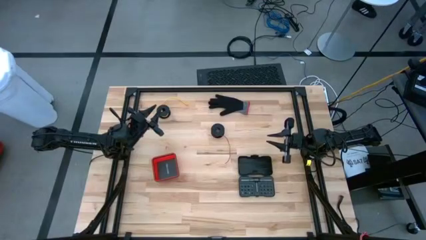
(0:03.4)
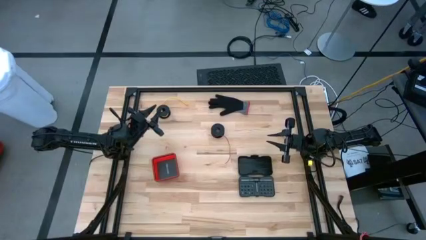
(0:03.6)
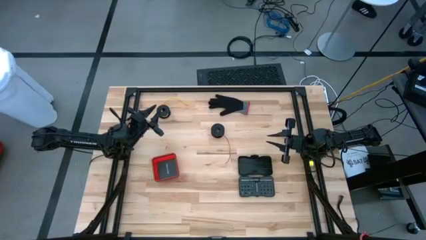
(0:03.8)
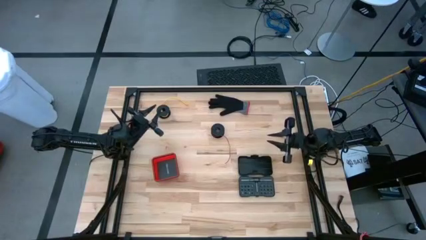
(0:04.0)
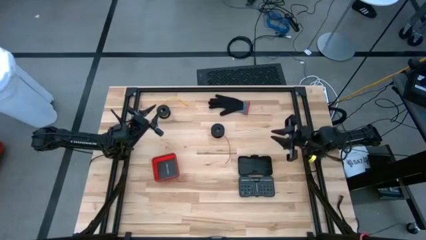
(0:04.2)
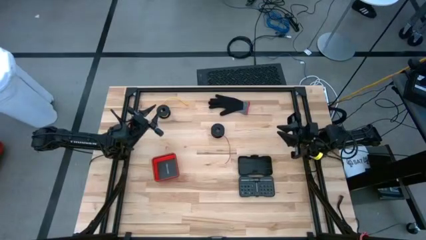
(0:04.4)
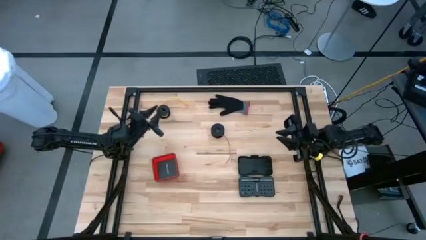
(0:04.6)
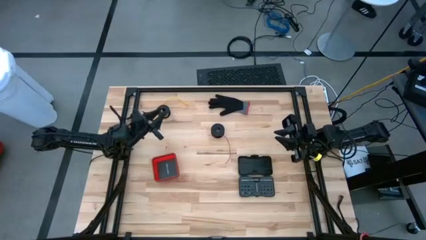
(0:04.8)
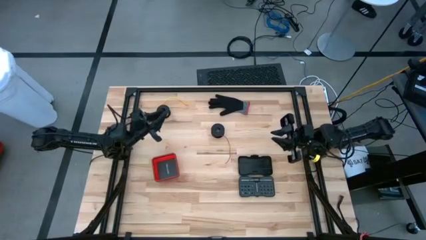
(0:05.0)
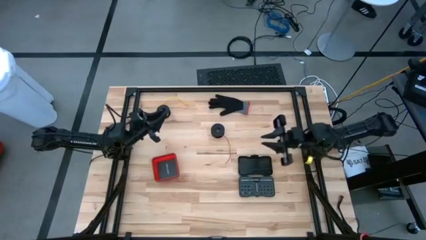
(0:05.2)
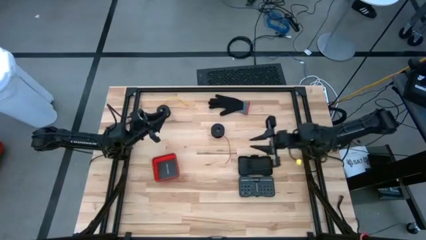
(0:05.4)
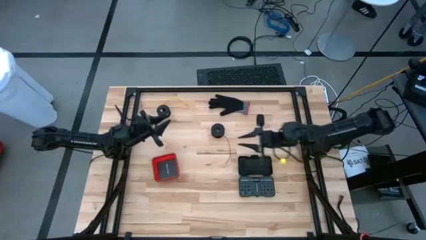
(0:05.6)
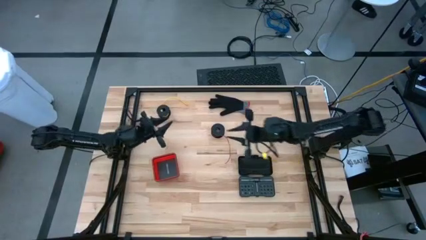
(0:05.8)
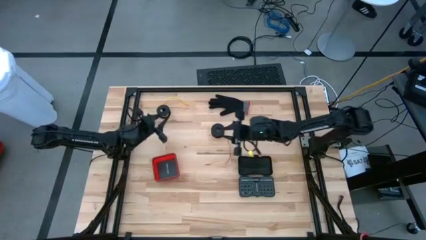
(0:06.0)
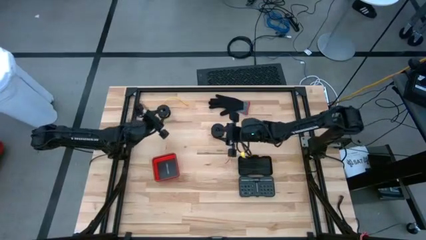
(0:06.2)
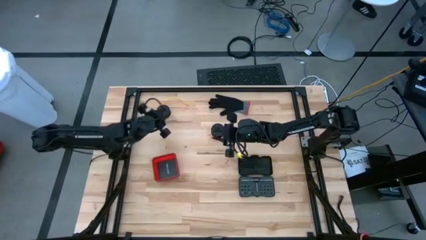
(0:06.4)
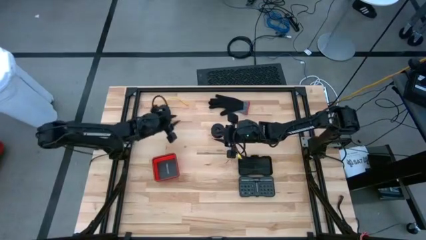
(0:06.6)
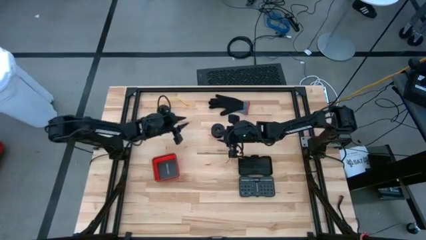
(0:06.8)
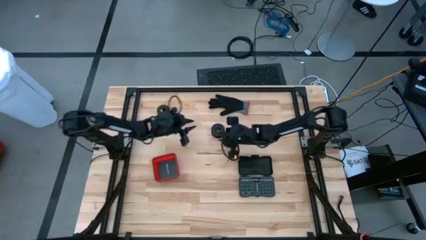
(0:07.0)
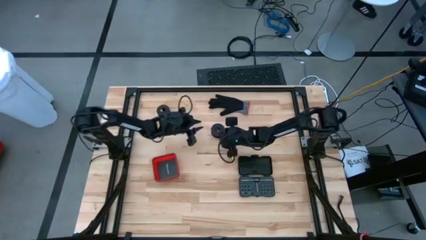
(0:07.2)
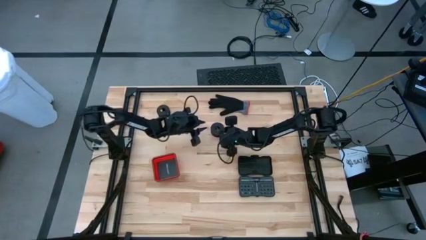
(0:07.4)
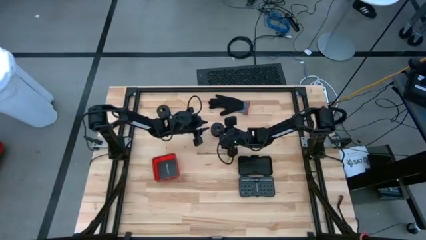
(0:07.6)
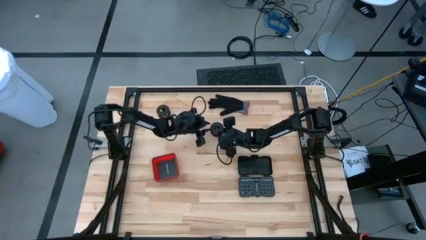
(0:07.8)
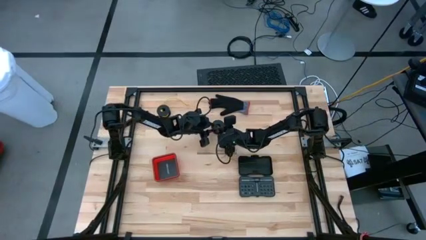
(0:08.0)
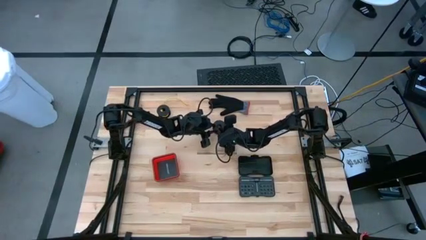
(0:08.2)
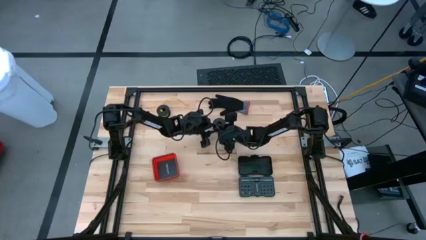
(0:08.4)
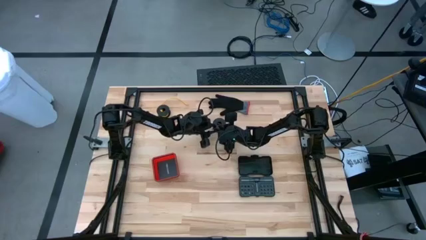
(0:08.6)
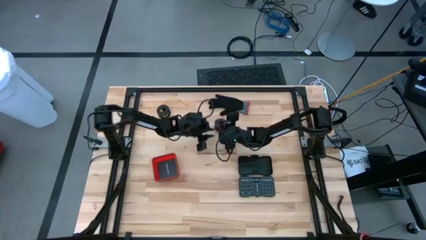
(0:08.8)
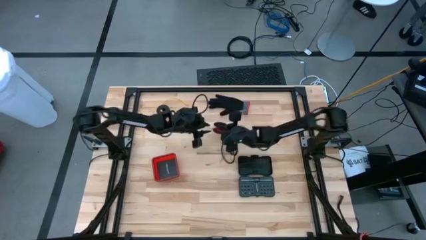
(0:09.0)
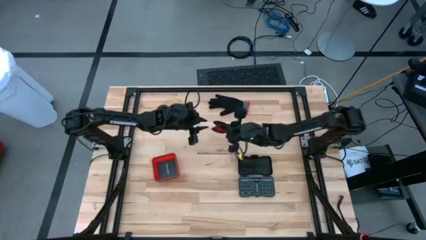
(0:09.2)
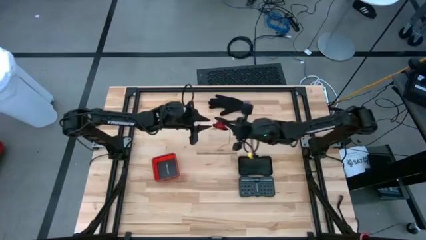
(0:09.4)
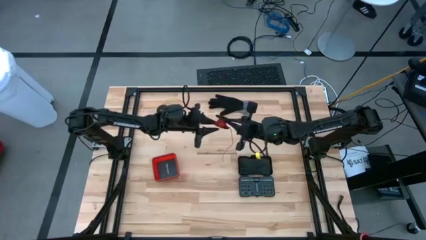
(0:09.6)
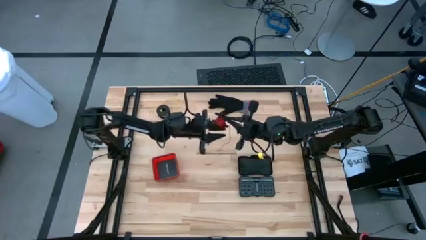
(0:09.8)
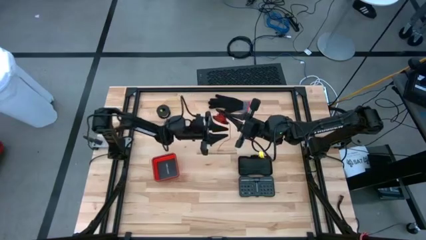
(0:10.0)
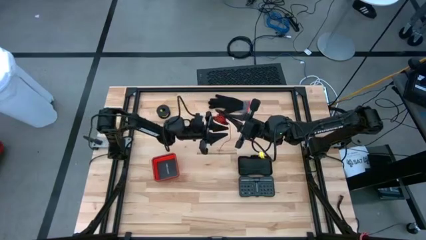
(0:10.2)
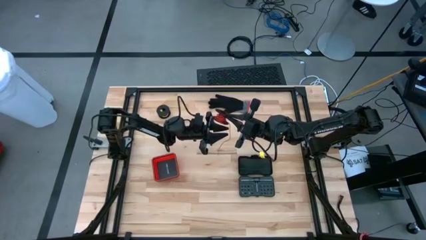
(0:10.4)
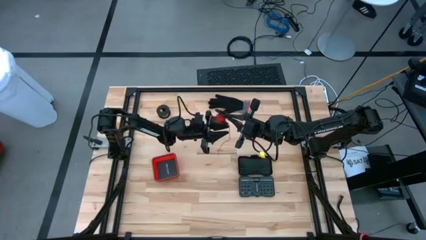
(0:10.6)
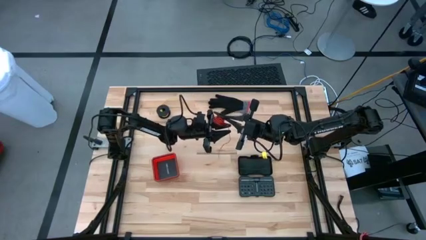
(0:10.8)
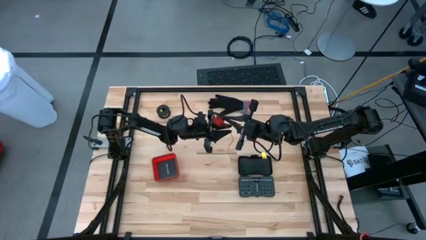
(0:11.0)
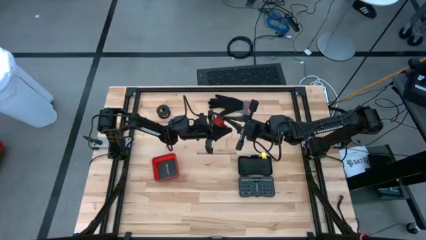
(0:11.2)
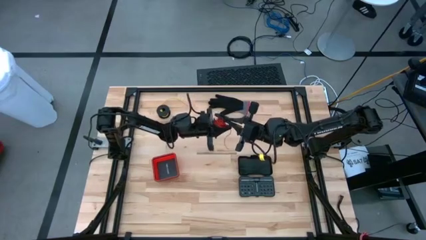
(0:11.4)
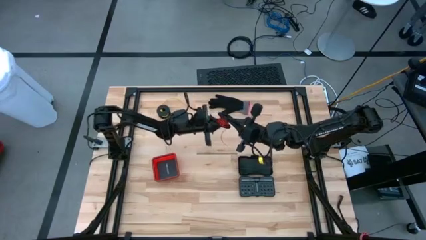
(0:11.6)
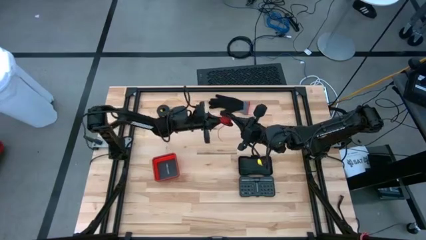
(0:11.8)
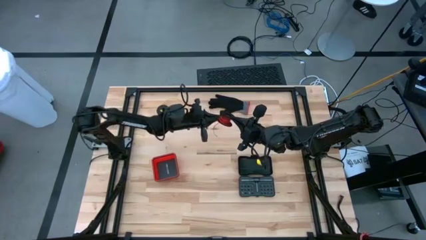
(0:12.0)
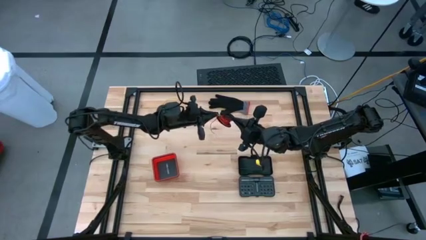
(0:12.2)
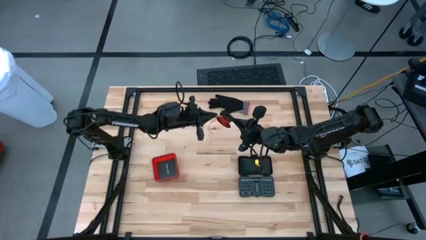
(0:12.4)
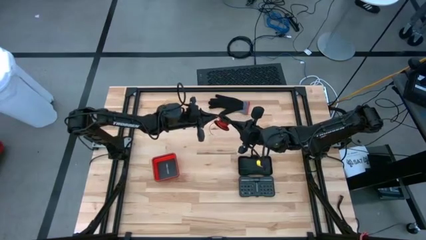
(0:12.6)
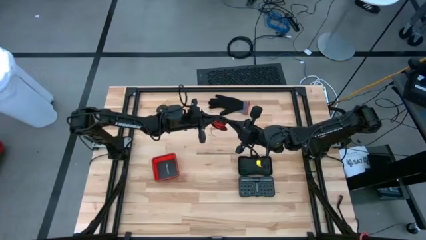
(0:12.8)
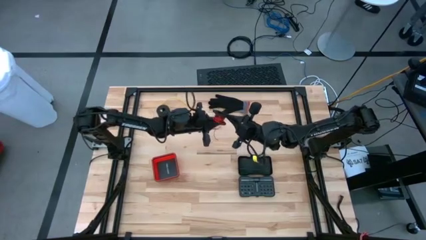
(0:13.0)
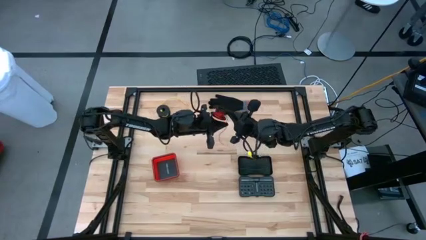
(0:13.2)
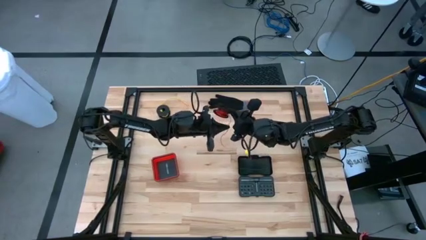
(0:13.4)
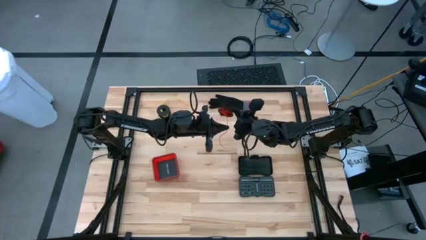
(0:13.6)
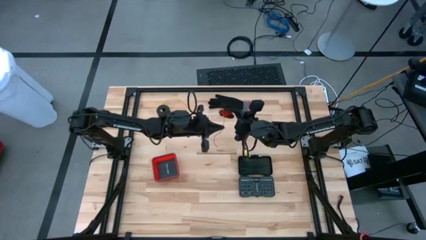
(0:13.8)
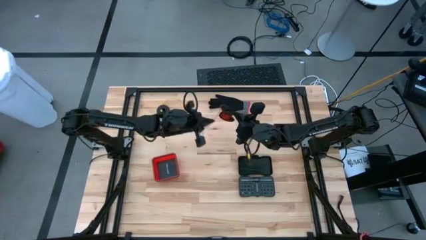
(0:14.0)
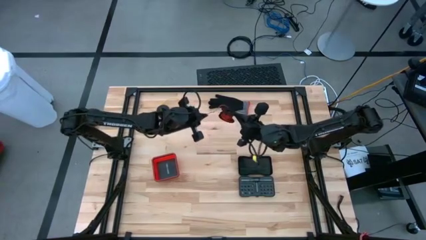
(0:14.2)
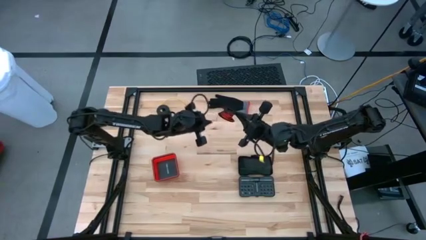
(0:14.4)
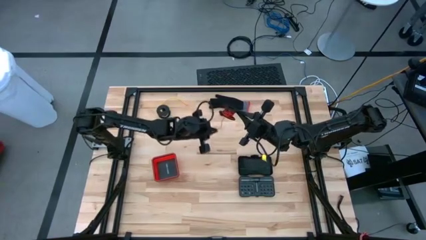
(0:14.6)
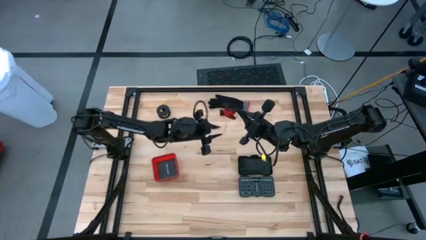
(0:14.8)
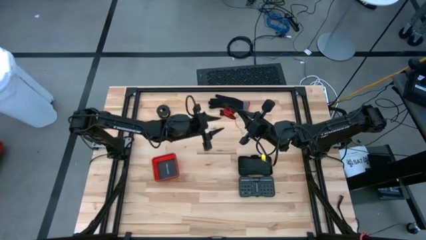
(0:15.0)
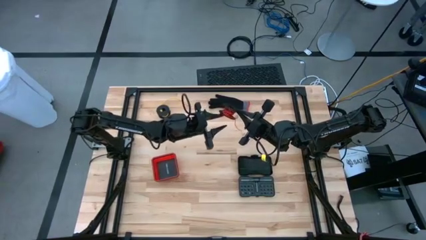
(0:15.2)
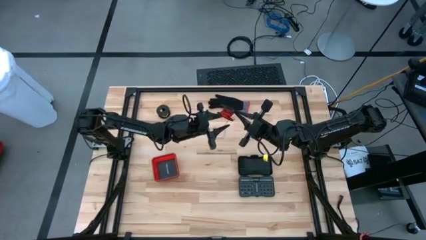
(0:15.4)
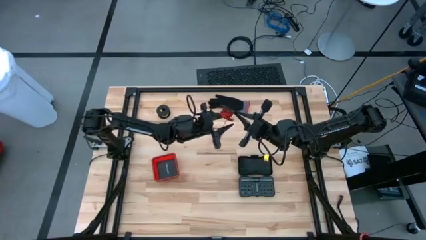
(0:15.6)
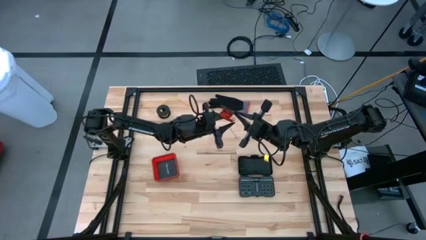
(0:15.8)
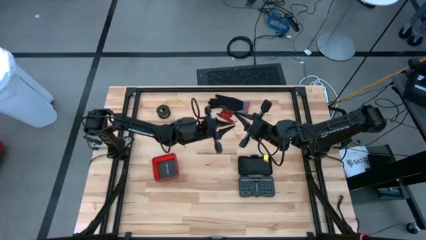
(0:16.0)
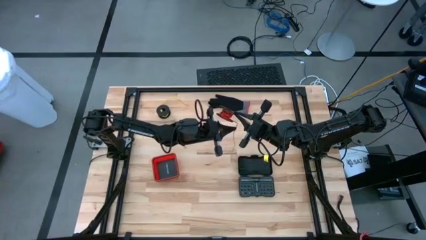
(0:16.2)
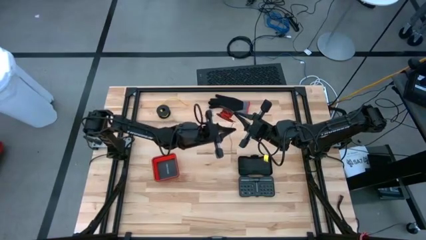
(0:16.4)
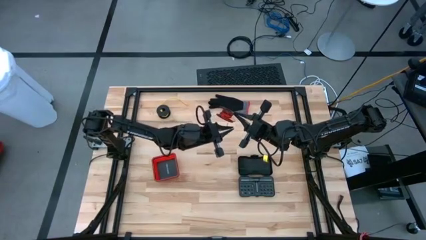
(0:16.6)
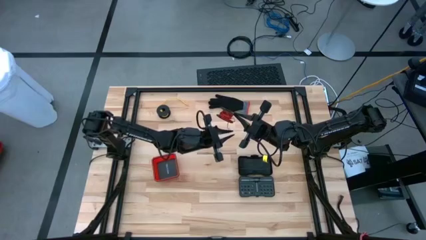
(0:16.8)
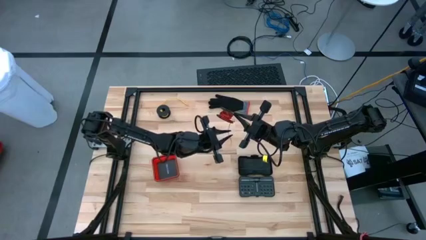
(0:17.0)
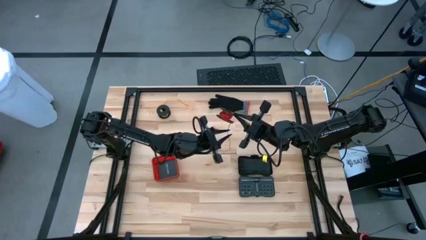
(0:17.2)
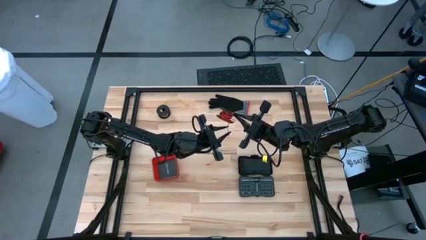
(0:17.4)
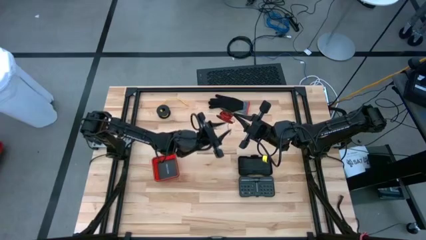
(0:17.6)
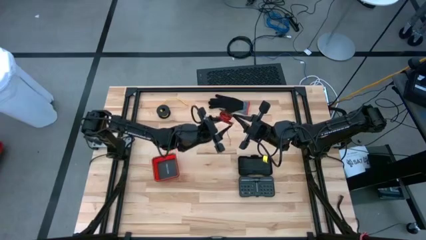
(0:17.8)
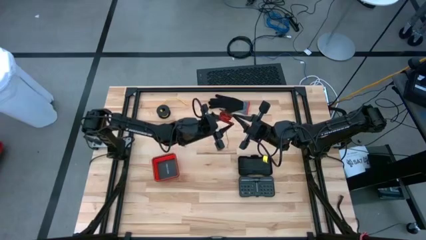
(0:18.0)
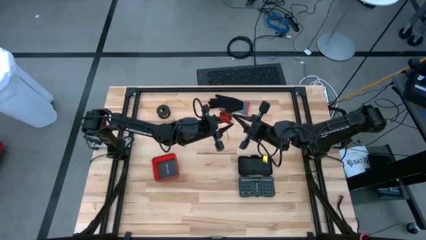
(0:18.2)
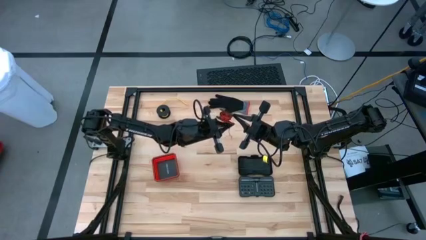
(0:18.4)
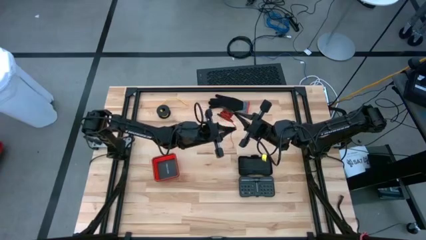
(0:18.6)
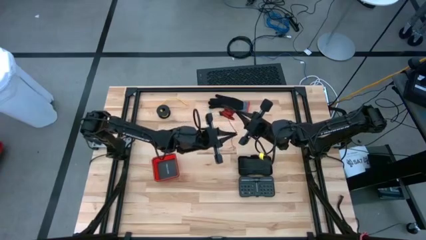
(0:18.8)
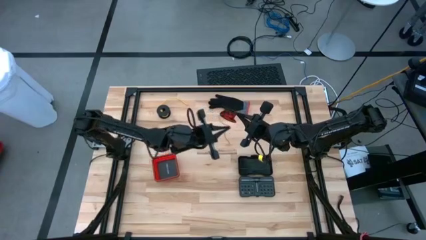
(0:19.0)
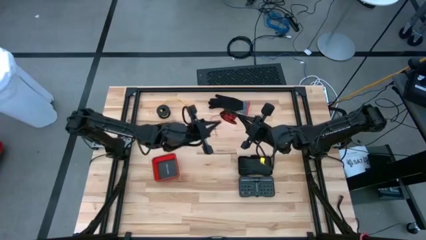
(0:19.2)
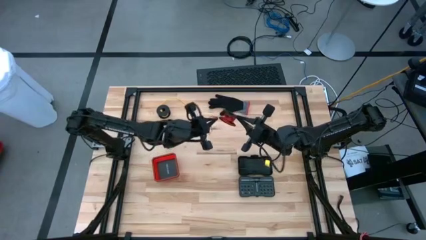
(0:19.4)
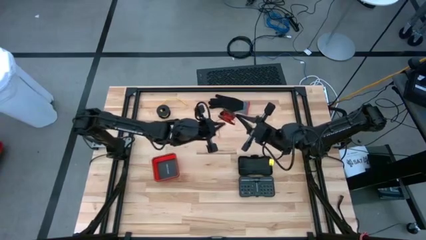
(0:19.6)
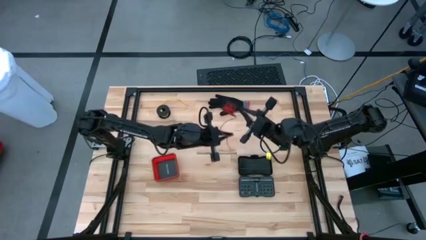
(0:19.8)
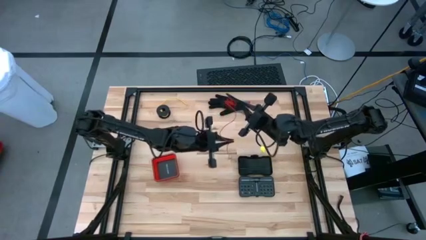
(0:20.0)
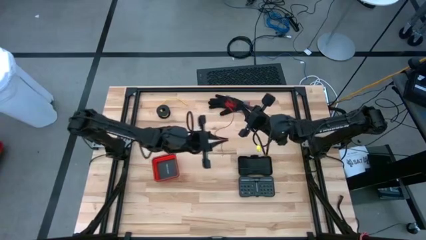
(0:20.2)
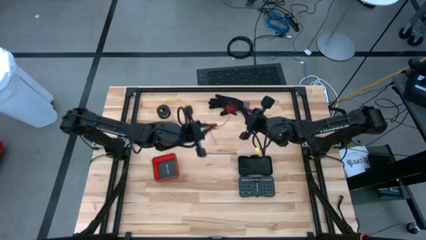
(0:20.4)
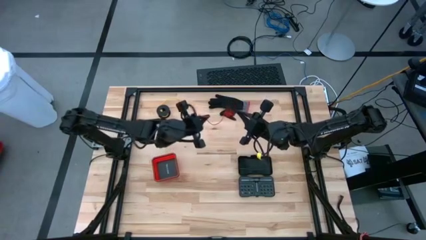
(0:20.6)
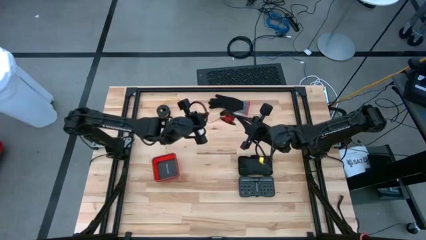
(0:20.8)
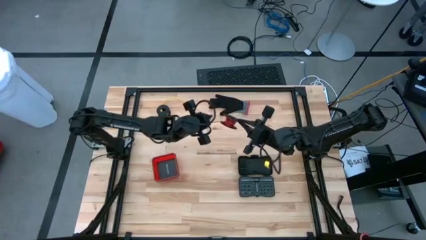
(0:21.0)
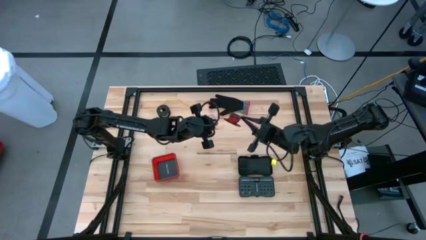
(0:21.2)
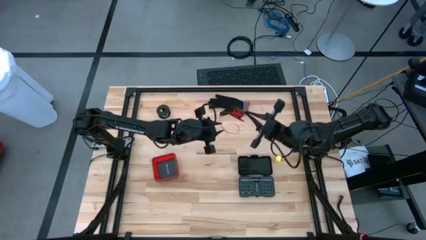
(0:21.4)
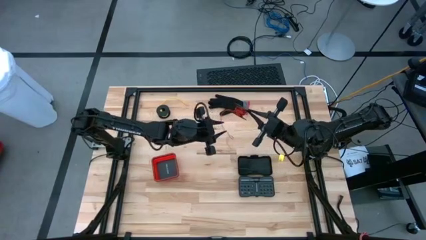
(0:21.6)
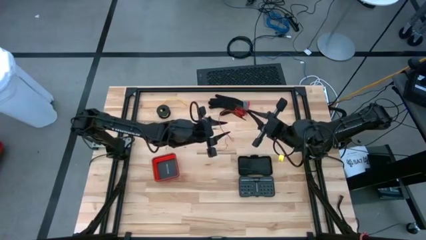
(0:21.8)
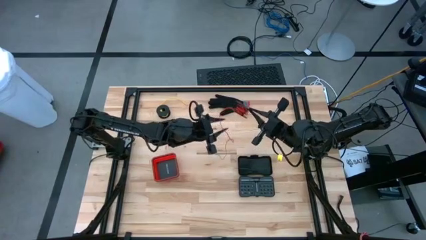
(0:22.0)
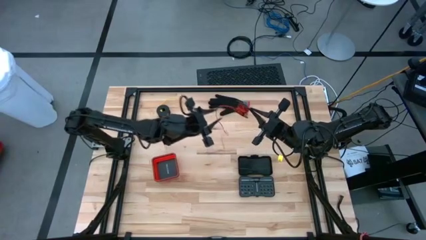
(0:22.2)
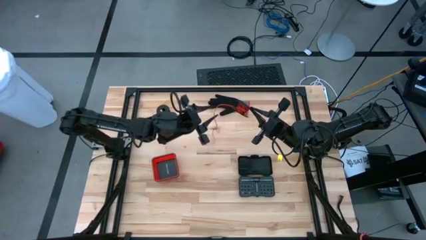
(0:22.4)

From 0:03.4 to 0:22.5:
Task: Coil cords
Uncoil the red wire from the spool
